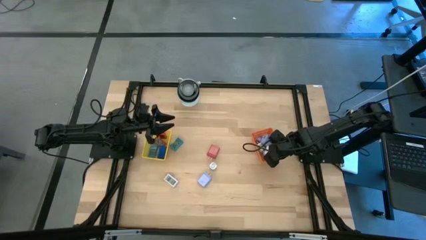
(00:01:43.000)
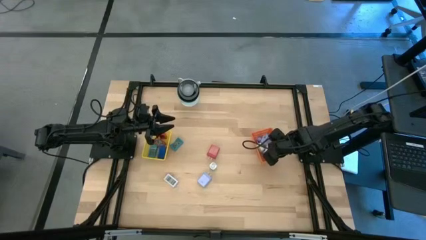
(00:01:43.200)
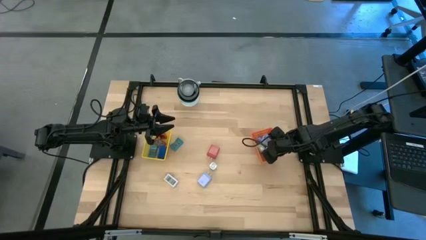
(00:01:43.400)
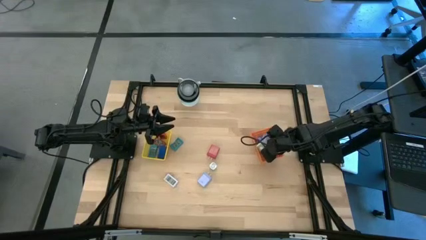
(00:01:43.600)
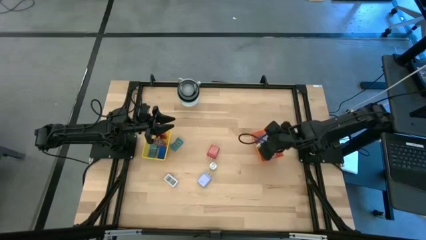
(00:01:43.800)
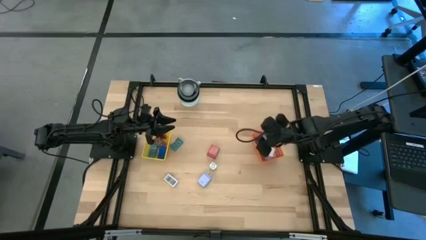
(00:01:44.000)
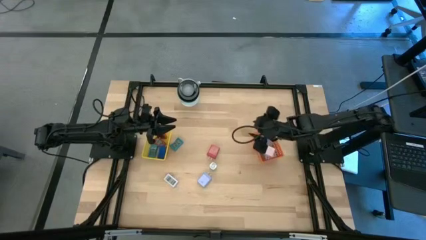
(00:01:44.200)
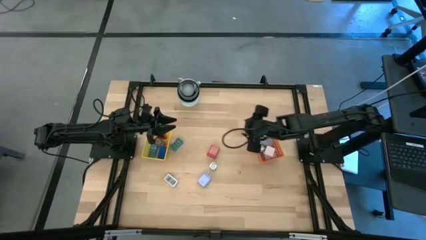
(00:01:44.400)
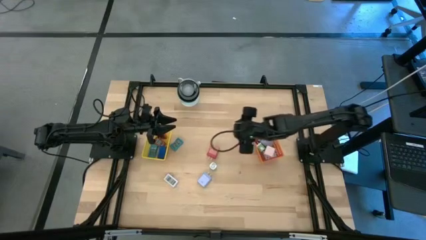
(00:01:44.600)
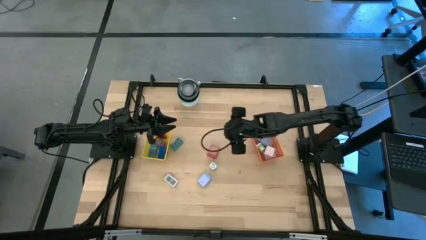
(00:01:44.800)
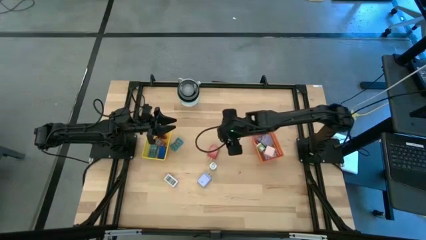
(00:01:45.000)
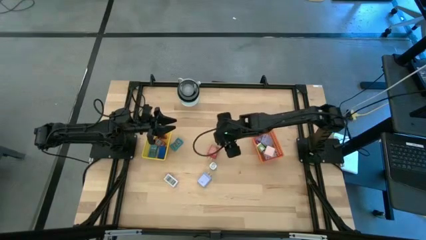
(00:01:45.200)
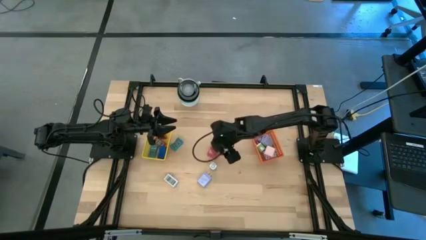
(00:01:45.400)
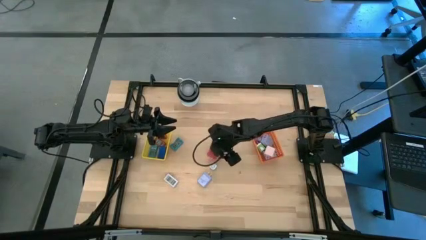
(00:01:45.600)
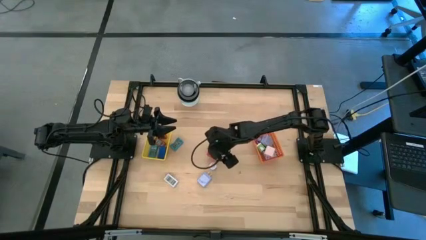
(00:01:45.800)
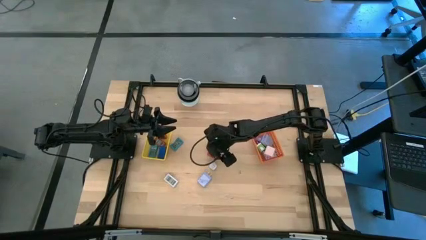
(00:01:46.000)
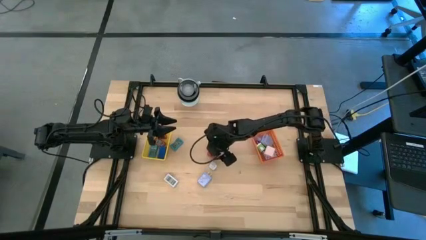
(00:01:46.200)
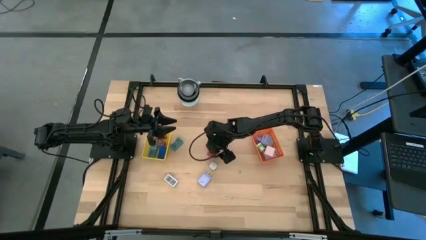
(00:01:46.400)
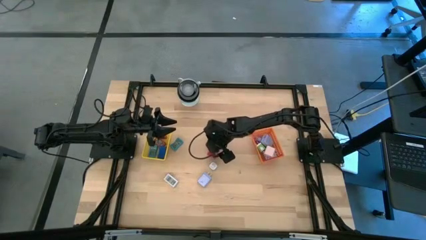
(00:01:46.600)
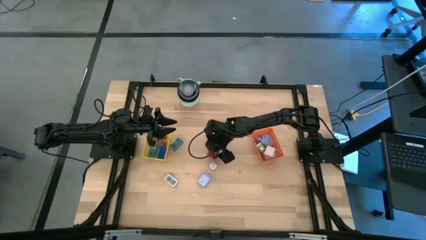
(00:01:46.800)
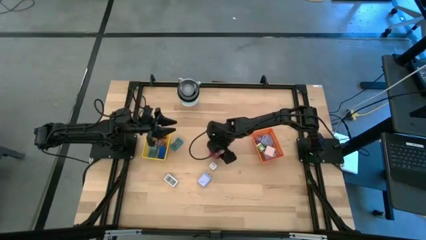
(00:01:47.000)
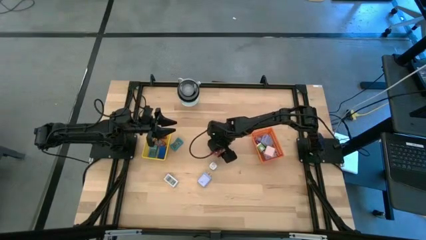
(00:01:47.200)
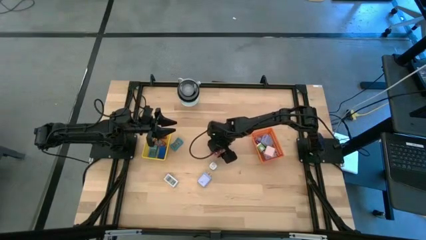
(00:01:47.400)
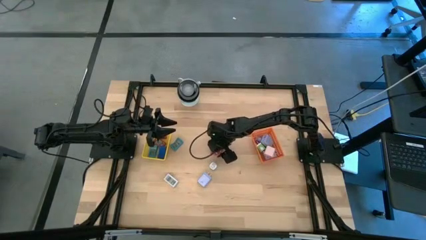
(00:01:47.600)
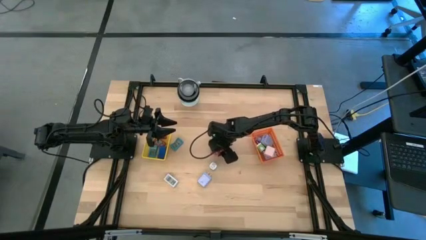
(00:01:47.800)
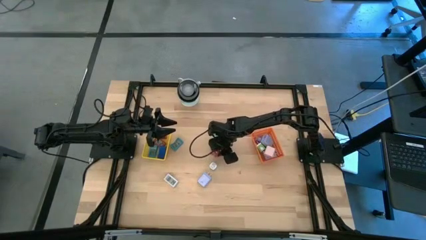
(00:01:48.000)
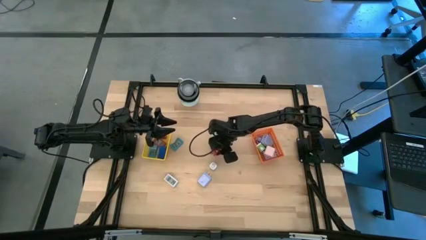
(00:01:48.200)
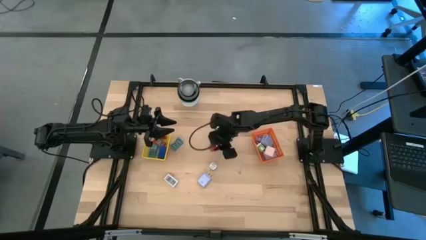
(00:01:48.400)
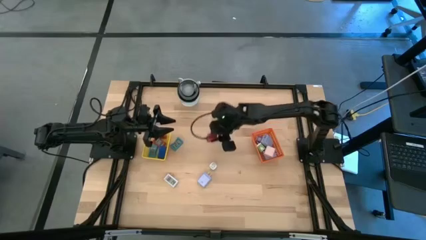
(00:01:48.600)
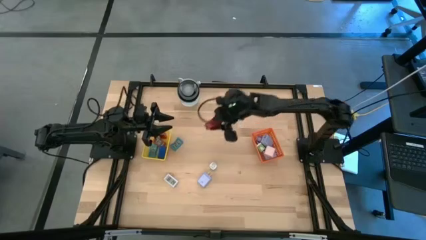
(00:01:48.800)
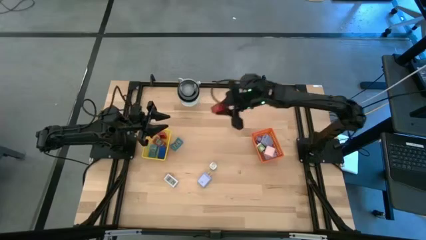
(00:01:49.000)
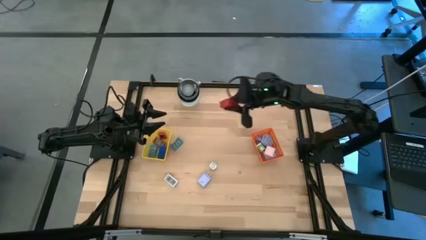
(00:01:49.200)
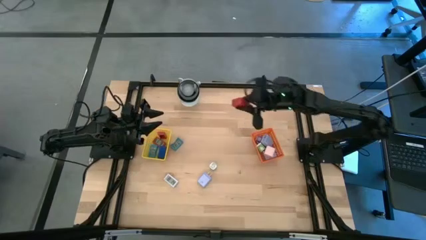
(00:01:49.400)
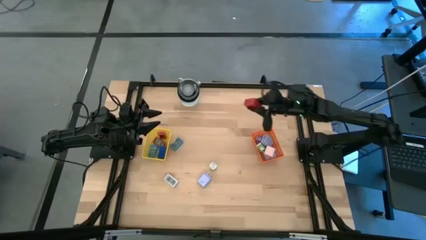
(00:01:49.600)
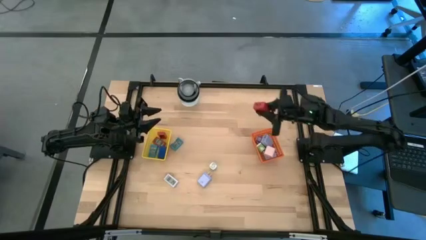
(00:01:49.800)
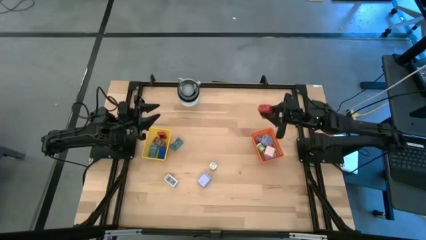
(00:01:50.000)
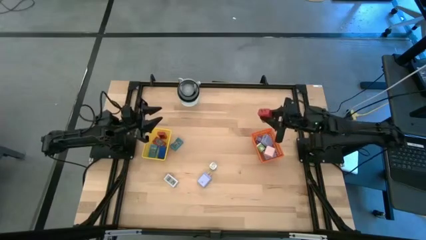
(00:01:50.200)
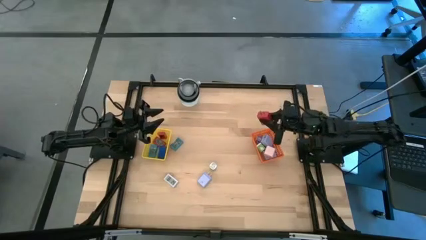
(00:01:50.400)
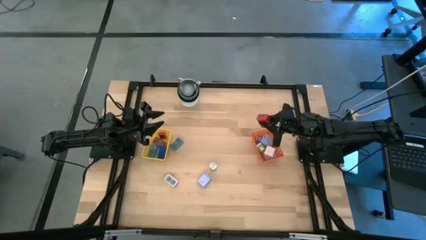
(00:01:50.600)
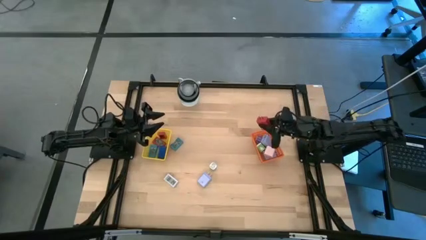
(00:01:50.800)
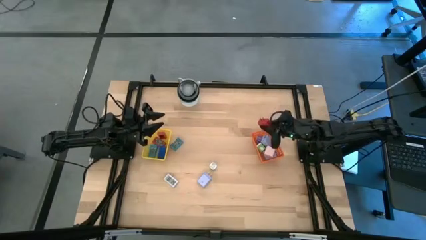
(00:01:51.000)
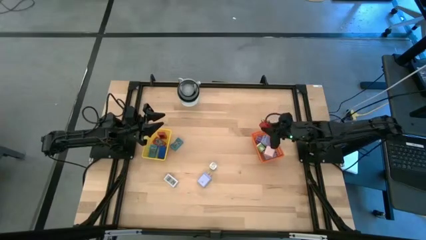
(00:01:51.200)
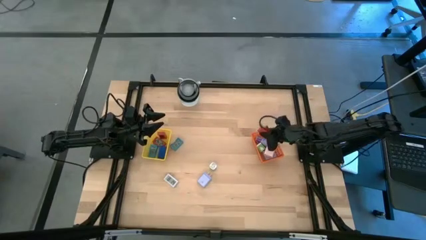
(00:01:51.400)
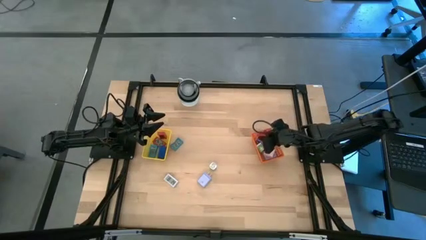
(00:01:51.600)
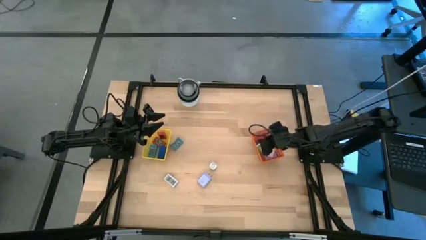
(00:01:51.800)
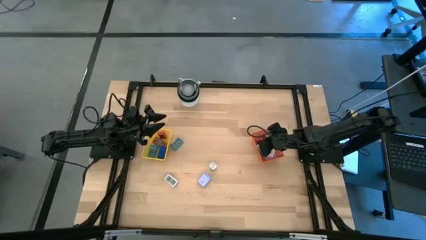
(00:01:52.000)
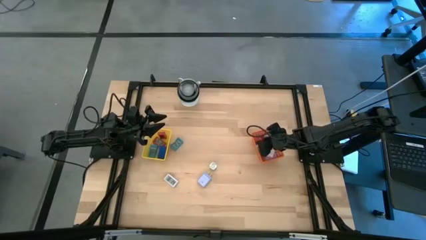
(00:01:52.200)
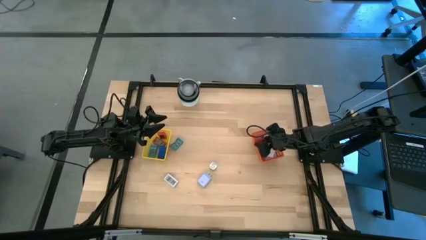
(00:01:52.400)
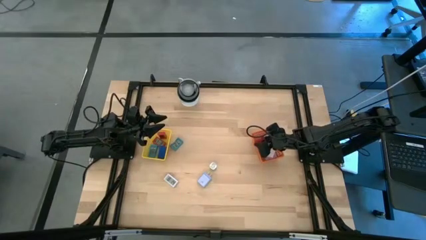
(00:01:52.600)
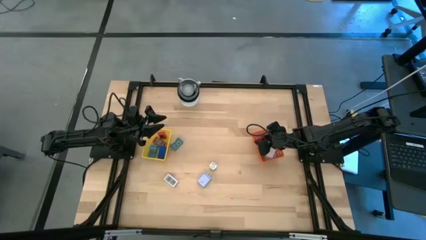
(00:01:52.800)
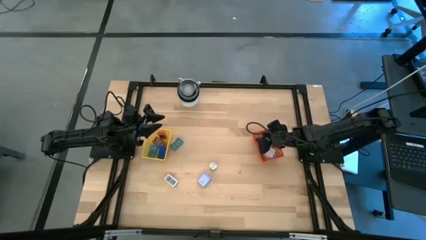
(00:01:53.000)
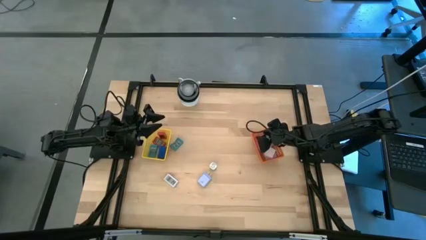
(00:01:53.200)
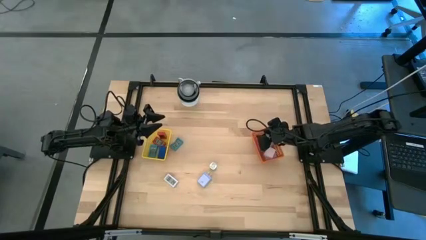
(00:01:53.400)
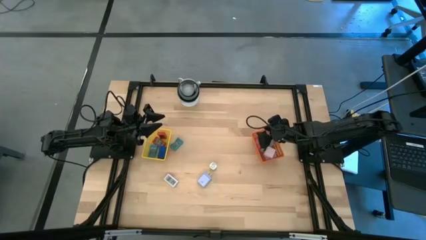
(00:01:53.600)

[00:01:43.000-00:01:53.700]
Task: Pick & Place Office items
Put the red charger adapter into the orange basket

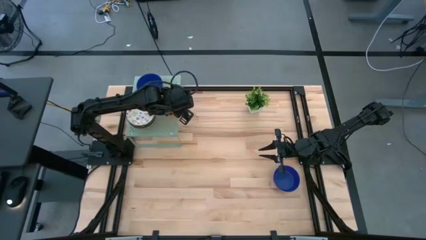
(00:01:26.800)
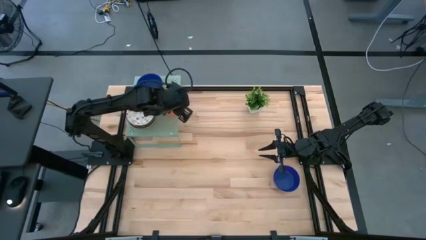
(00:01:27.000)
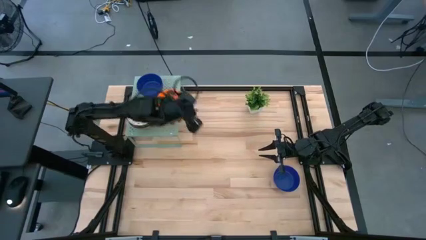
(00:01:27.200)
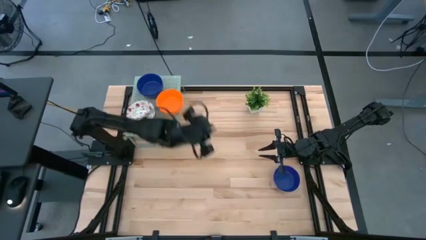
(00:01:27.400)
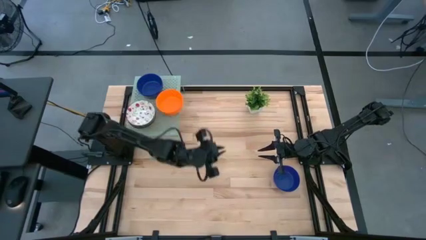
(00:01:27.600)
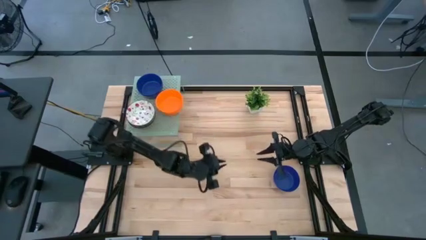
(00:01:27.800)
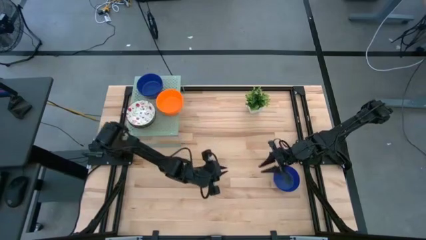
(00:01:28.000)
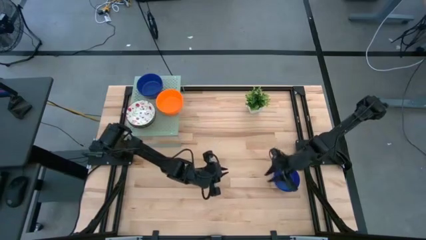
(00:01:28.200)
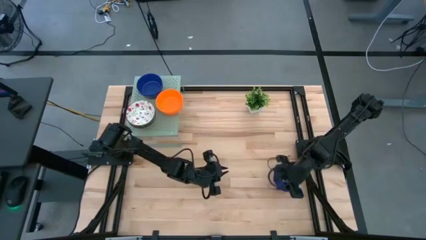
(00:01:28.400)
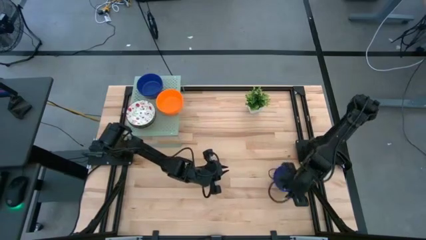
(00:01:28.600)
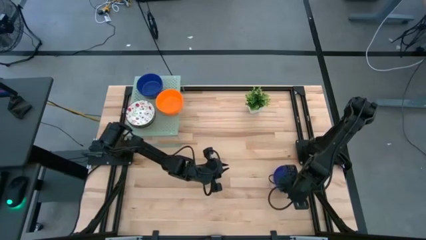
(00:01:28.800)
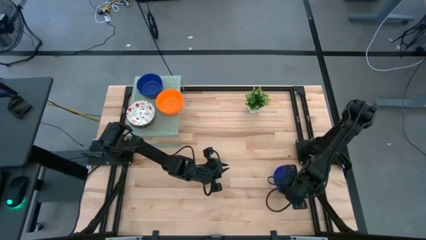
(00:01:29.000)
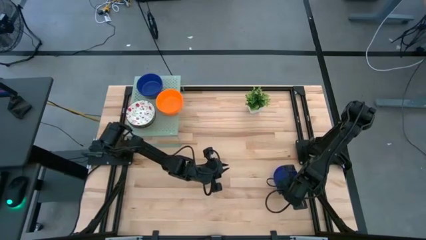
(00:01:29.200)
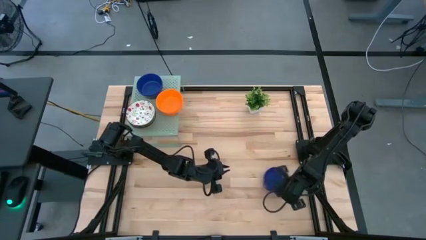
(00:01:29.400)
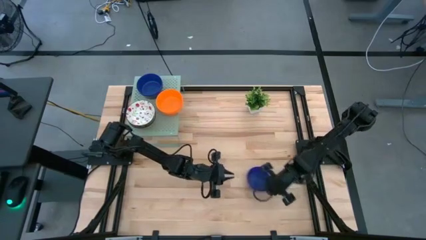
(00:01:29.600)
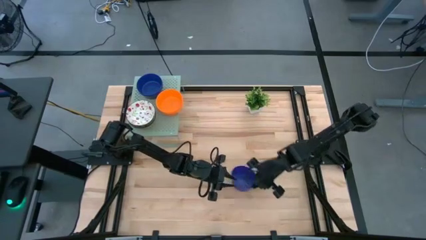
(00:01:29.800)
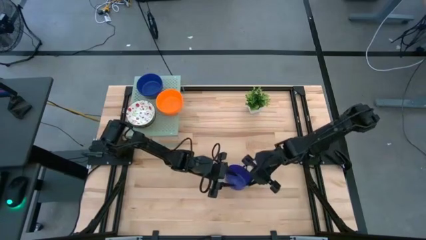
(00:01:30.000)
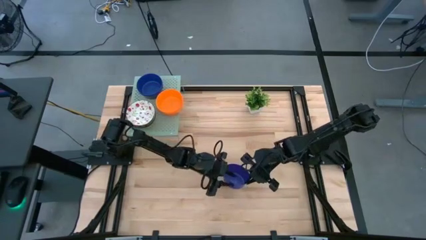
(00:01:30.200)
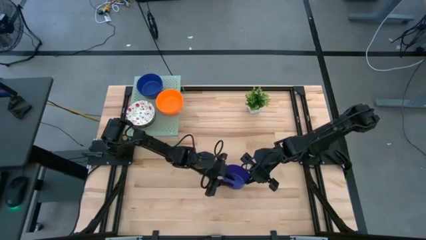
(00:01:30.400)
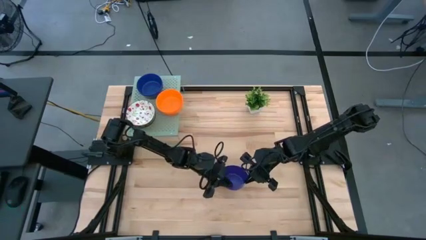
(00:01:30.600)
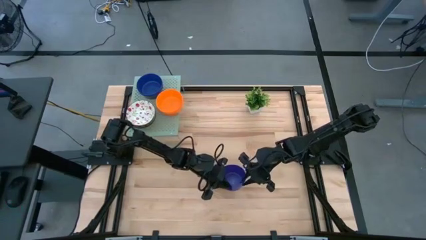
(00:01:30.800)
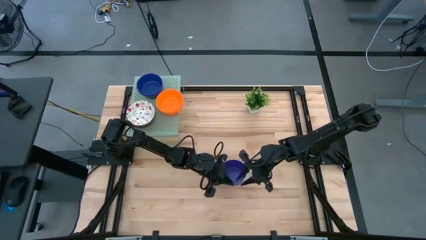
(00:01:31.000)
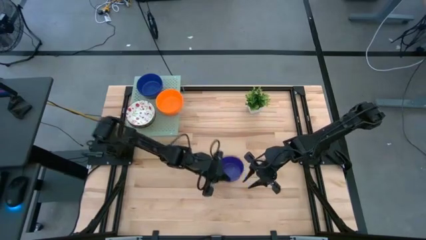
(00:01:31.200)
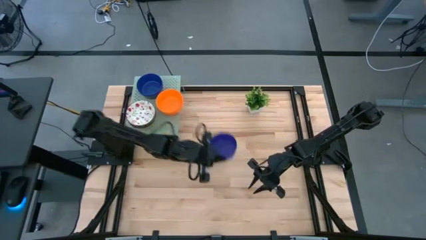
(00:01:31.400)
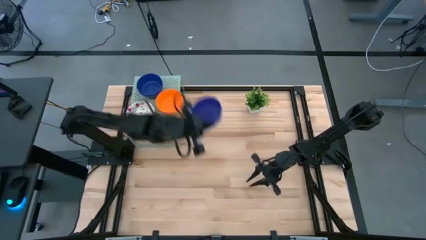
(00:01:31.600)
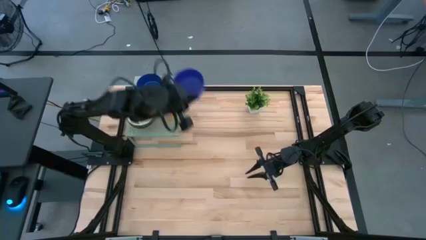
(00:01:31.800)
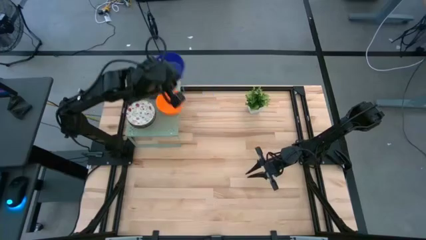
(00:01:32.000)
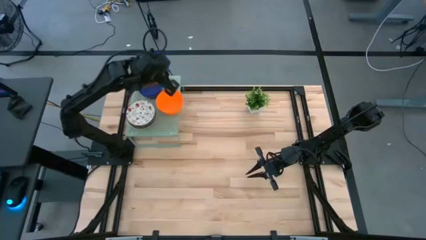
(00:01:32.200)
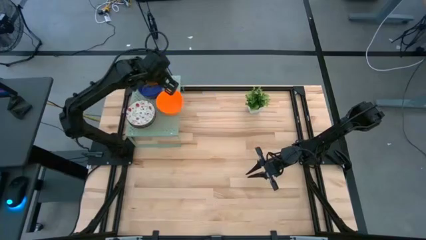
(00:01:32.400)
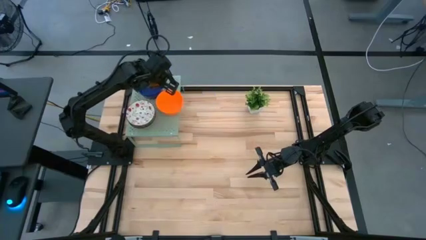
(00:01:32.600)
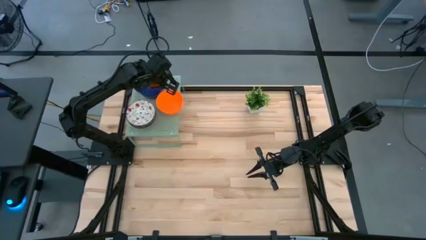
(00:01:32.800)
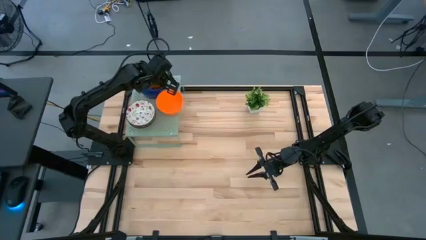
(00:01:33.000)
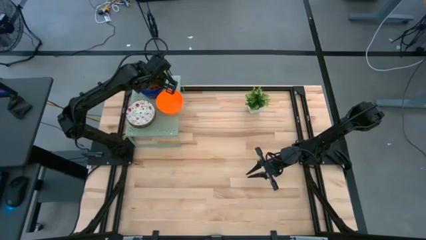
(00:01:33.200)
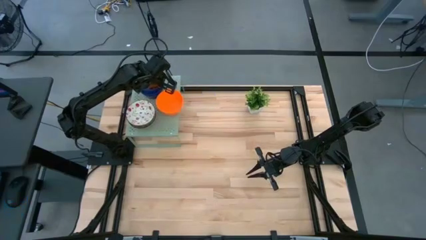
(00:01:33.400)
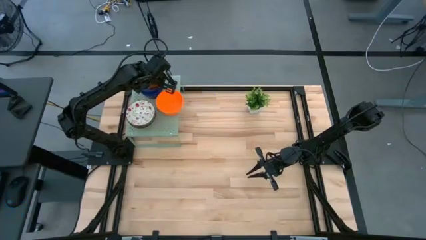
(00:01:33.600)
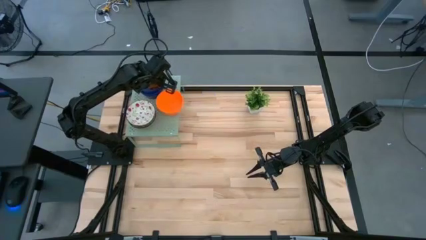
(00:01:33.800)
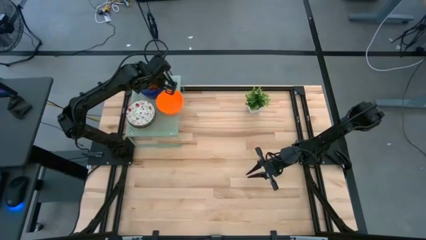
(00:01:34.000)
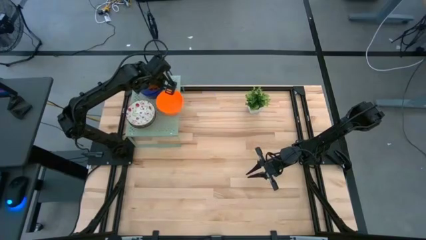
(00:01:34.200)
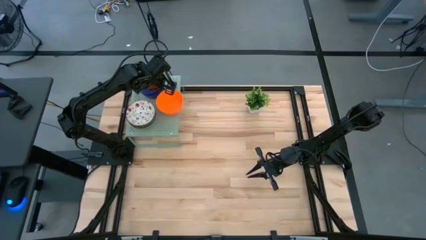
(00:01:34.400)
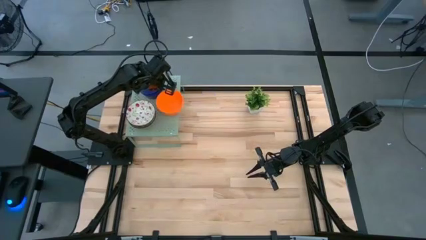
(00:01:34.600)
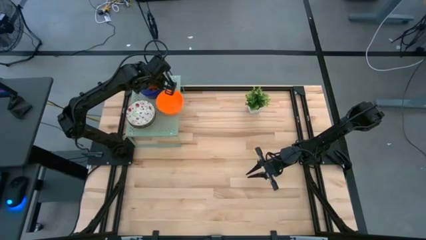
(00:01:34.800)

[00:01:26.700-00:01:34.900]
Task: Pick & Place Mini bowls
Stack the blue bowl on the blue bowls on the shelf
